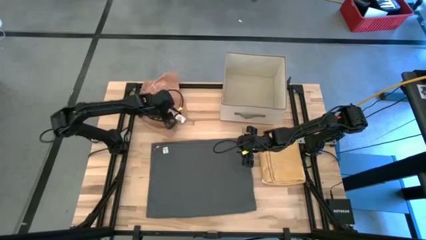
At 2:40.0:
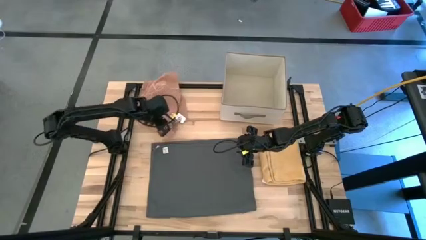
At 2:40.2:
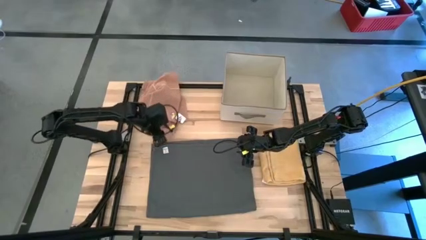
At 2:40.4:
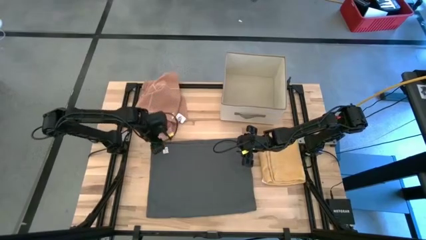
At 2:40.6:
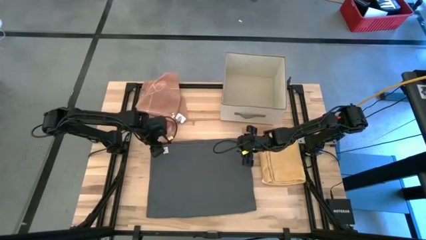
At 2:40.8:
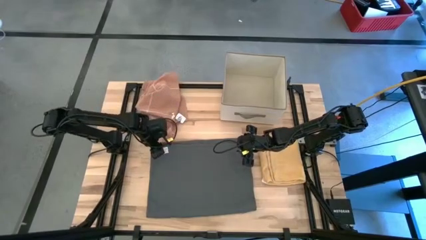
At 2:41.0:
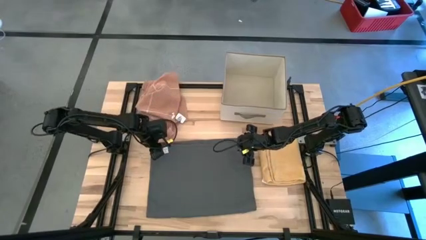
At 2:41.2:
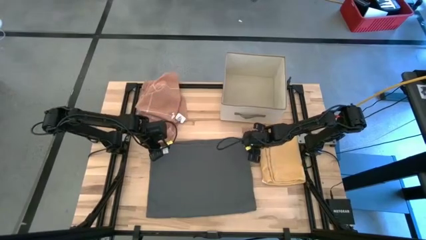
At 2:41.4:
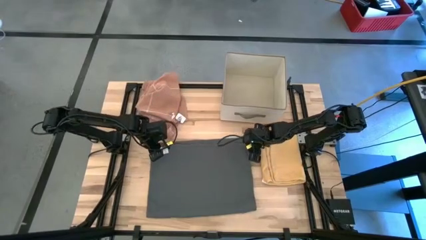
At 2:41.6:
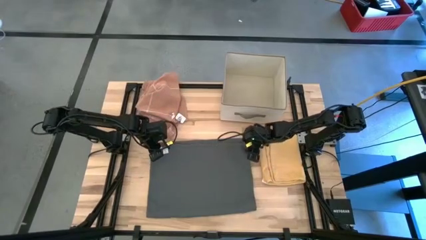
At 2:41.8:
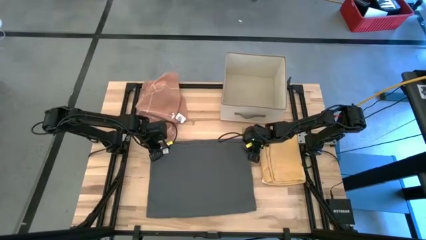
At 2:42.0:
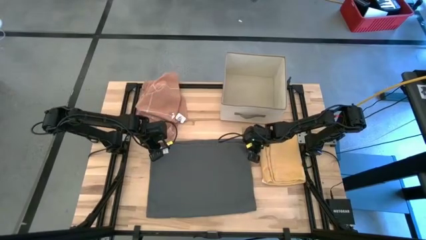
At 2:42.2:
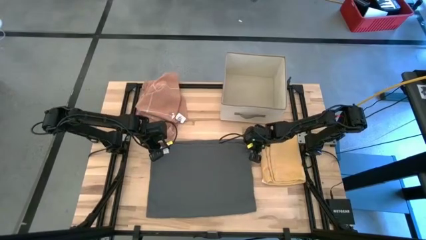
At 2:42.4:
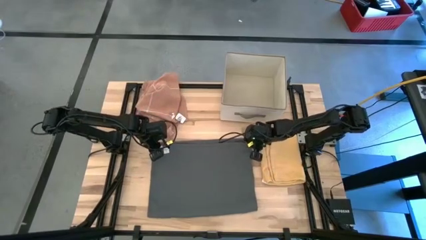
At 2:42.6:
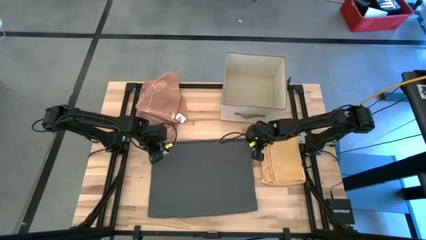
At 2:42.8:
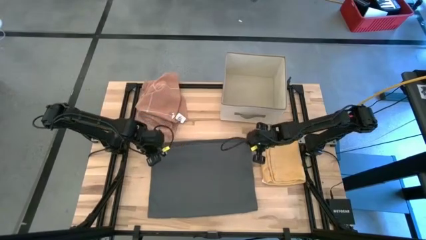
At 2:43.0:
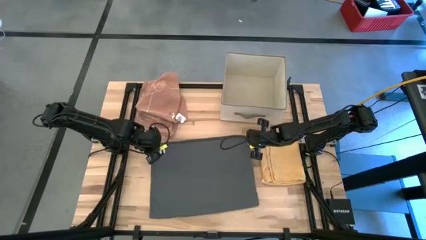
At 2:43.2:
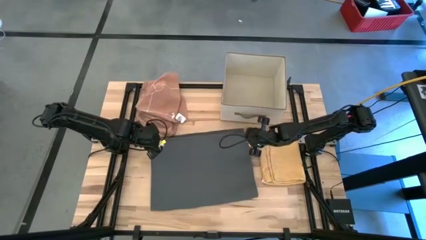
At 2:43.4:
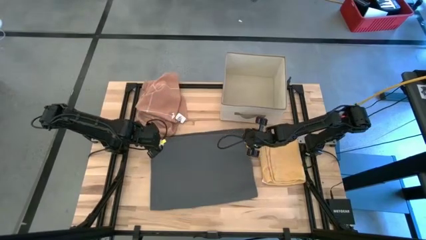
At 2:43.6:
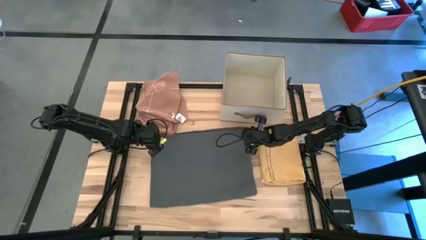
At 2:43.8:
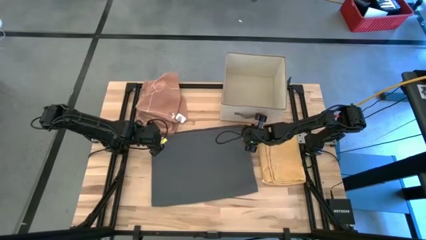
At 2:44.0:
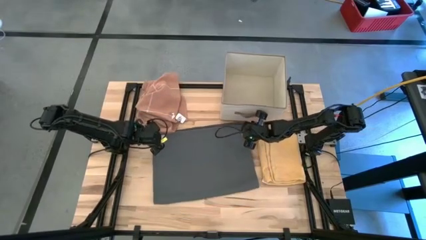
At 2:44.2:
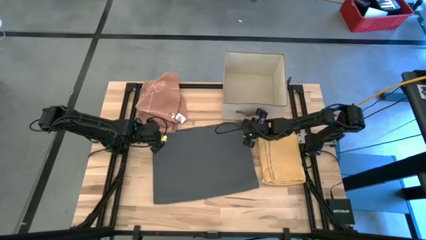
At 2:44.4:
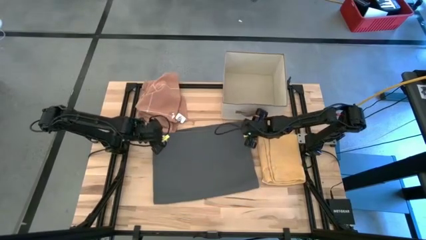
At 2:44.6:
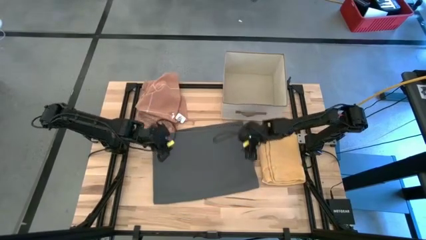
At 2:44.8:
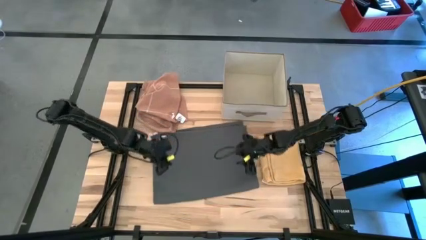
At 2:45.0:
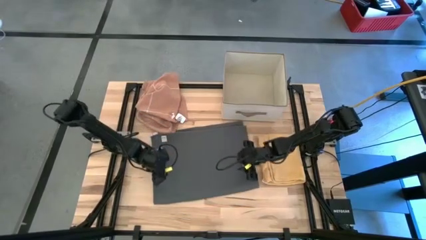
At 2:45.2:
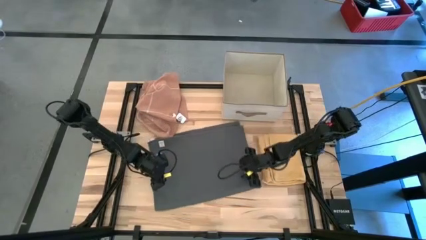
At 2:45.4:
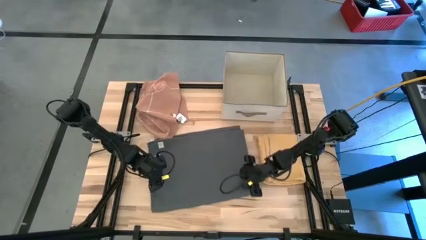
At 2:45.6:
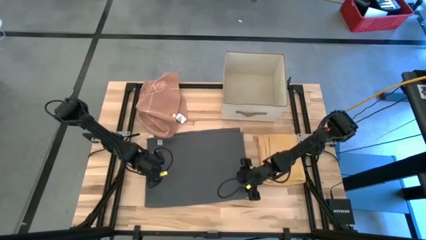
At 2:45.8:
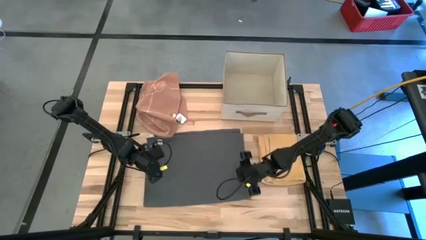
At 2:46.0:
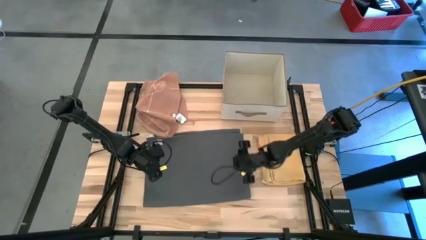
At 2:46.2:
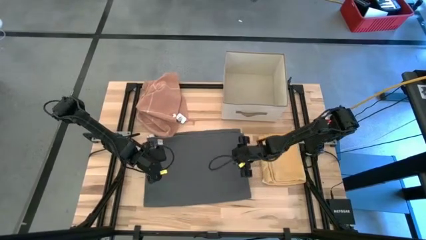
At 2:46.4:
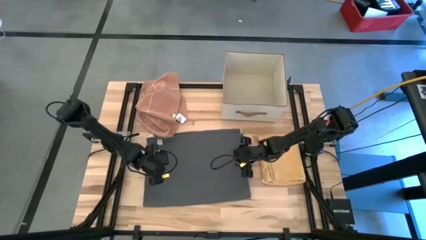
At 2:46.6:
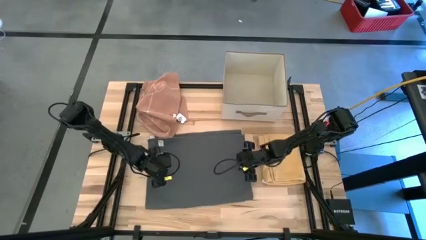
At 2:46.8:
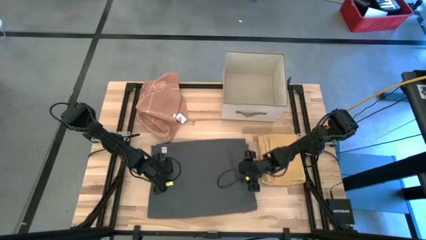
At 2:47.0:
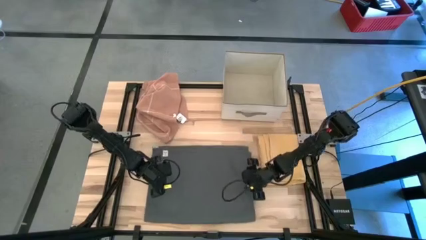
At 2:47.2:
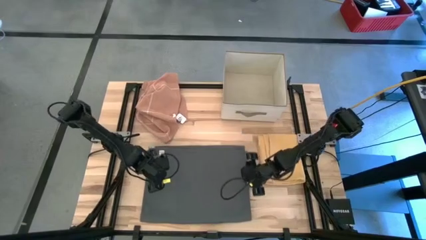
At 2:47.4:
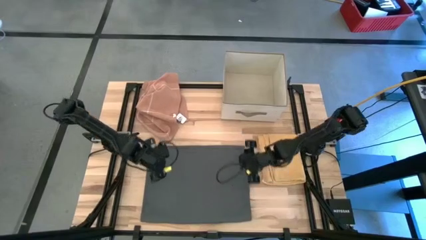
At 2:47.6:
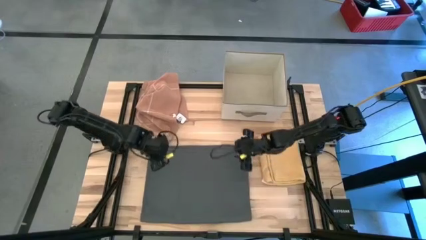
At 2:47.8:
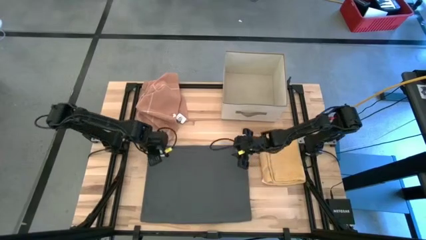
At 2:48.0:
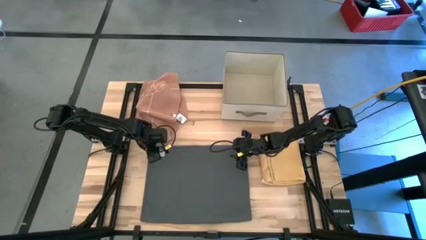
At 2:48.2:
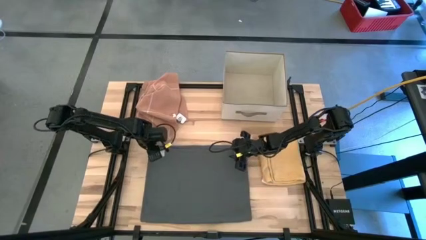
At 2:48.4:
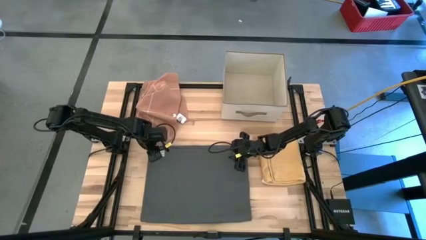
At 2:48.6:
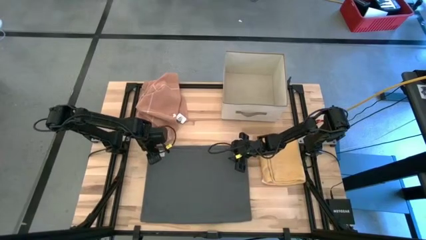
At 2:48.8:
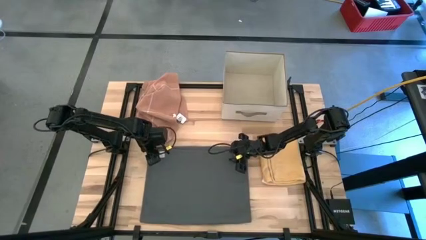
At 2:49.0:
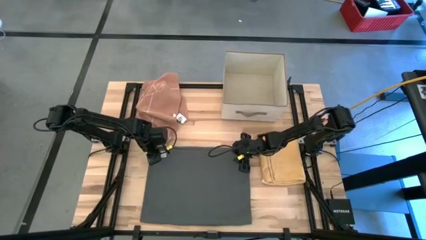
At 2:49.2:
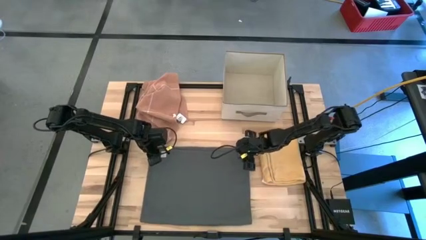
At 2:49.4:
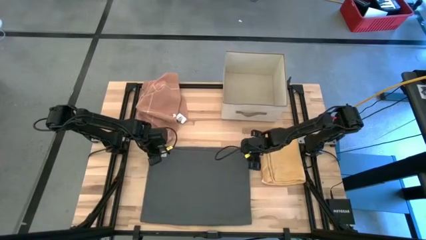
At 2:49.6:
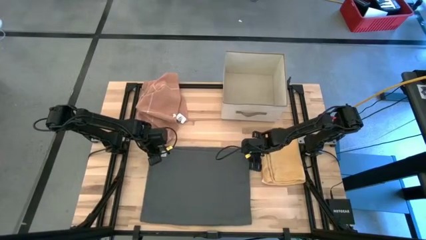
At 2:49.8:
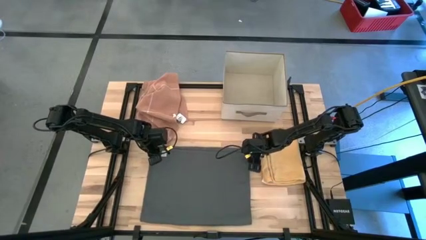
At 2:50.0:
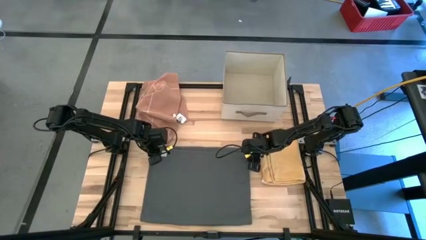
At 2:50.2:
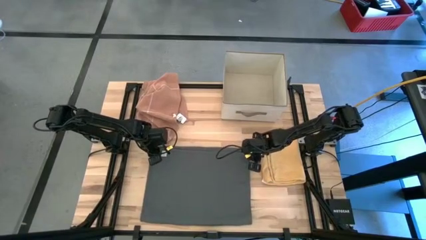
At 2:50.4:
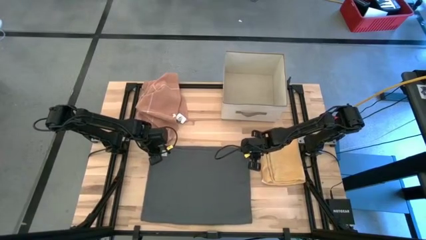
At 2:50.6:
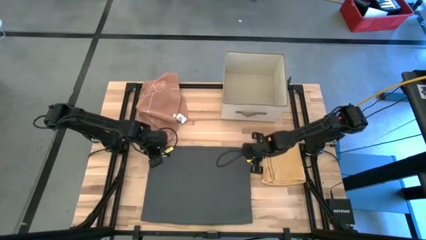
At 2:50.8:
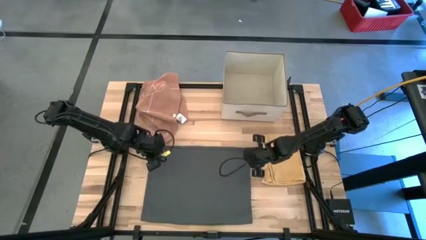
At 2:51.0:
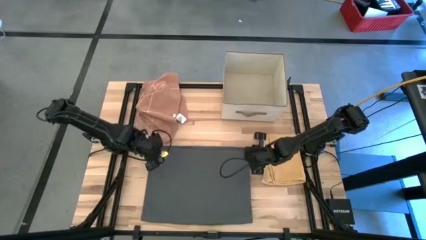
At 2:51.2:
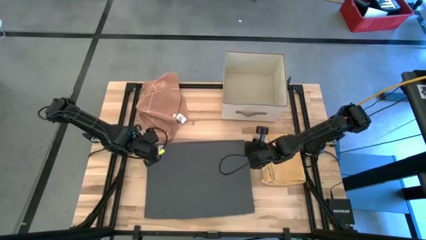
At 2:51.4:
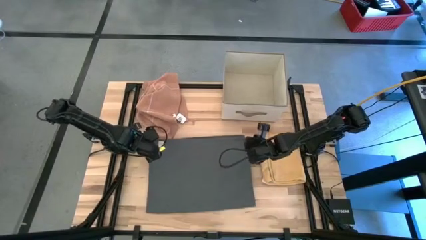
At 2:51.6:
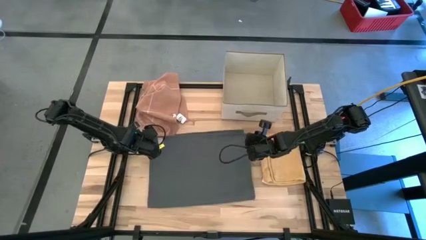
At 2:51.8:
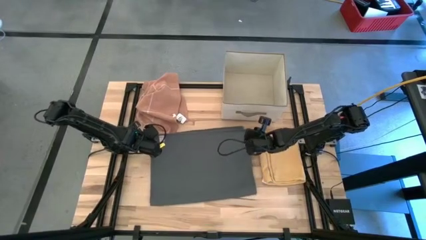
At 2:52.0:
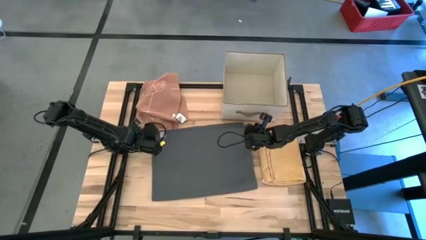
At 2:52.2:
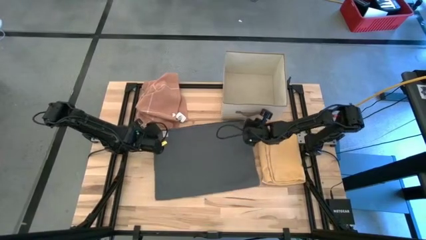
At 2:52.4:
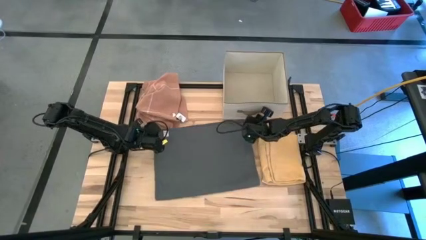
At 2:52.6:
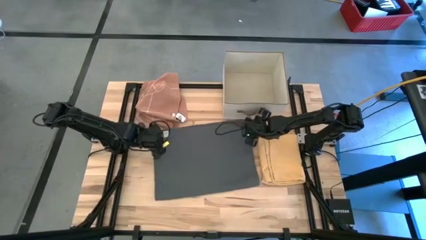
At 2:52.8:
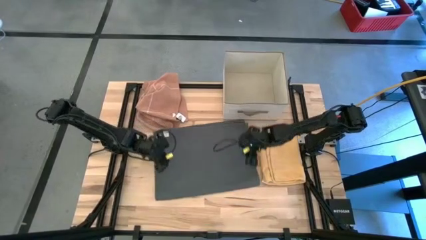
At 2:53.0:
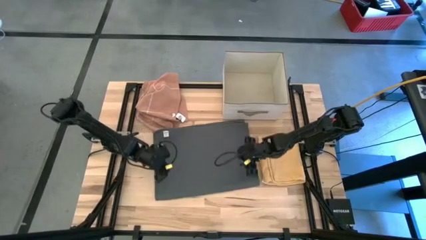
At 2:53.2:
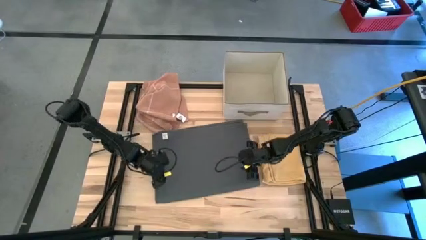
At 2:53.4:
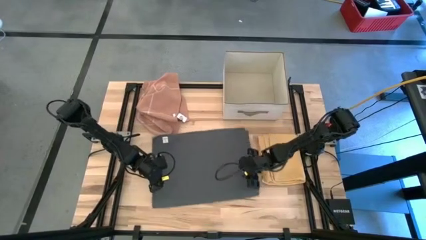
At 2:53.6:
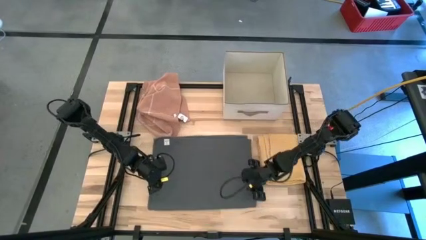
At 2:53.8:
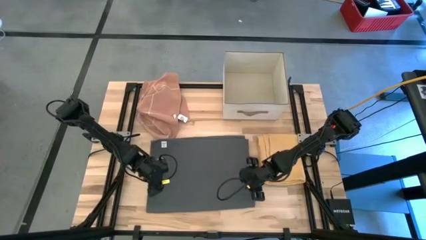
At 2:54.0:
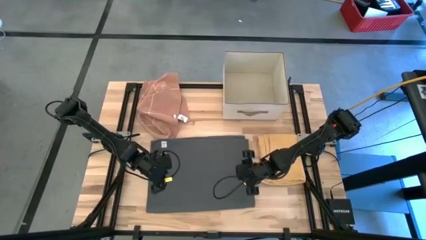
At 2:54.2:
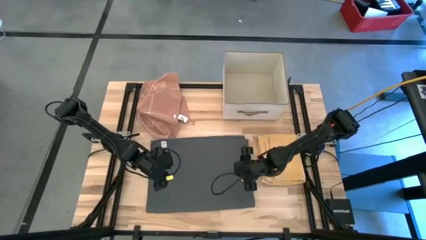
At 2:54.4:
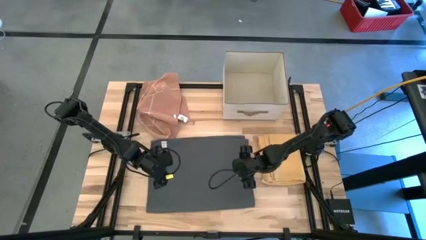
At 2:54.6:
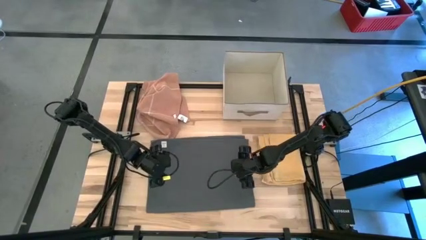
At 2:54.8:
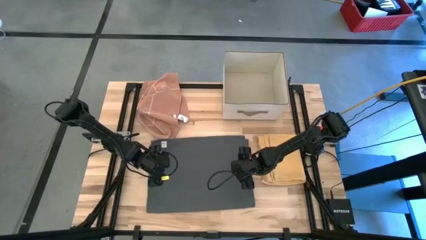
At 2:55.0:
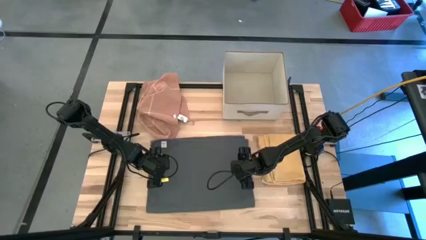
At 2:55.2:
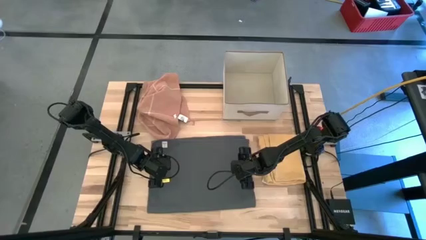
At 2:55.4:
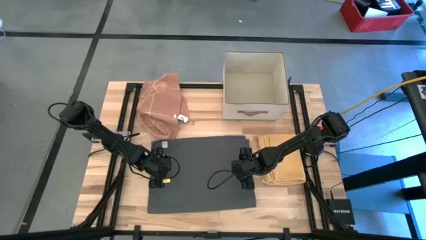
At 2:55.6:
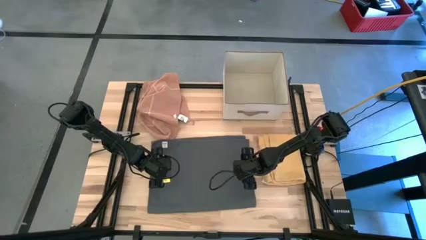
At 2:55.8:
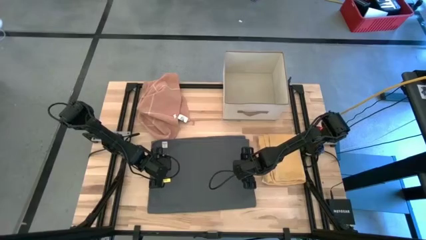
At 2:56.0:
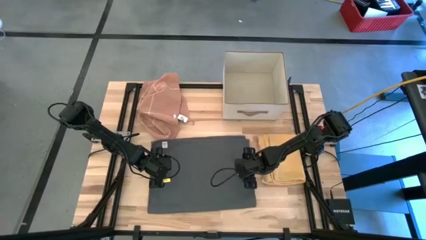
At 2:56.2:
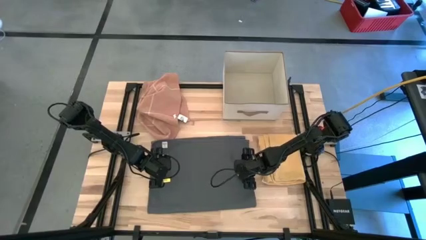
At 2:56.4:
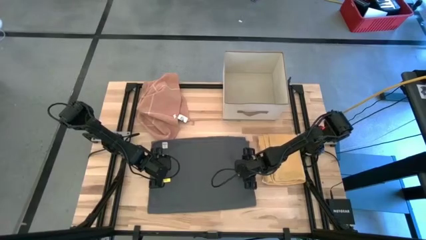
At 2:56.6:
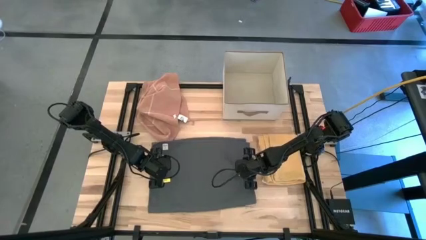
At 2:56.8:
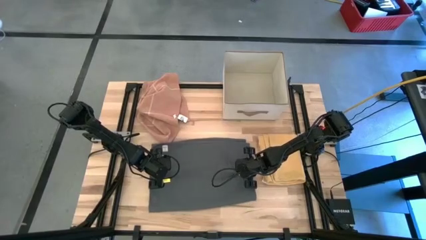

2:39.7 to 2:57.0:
Task: Fold towel
Fold the gray towel
